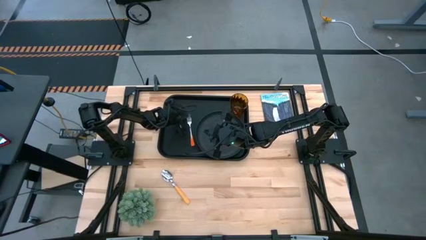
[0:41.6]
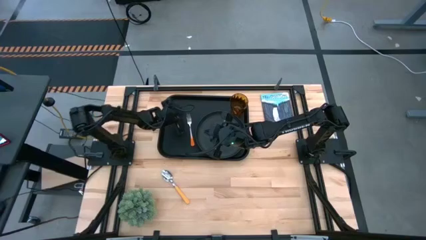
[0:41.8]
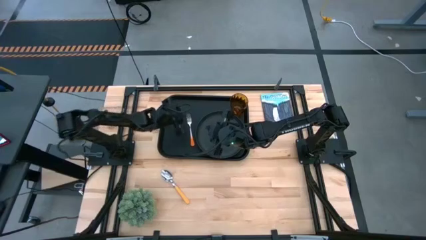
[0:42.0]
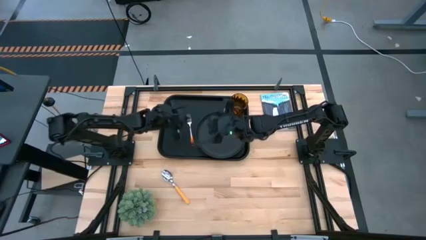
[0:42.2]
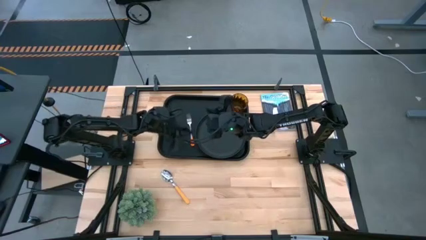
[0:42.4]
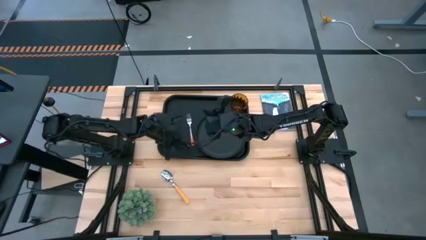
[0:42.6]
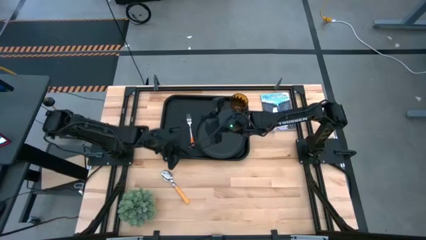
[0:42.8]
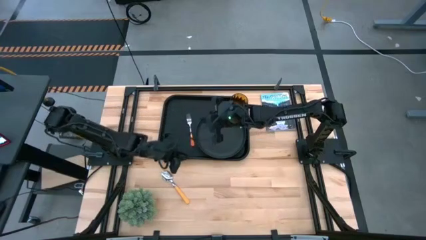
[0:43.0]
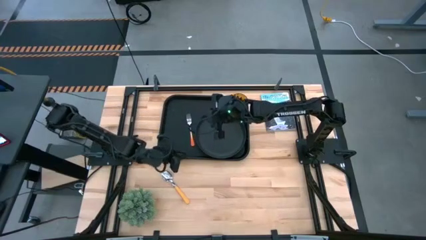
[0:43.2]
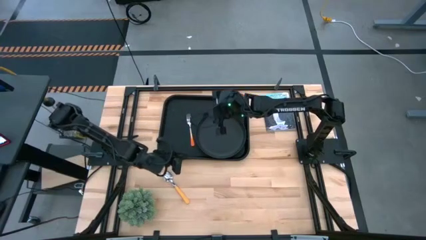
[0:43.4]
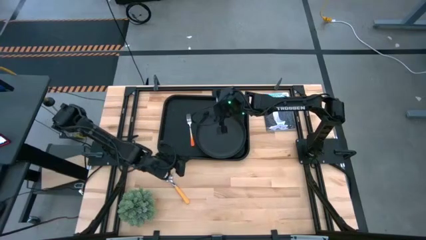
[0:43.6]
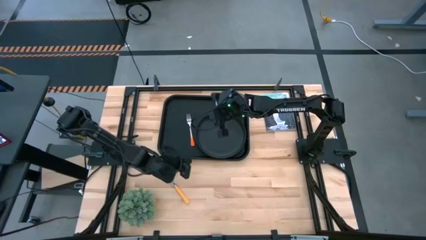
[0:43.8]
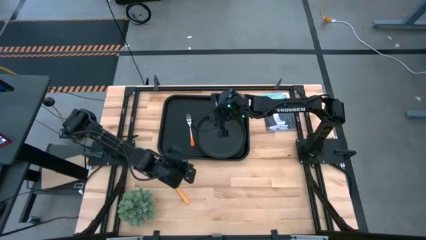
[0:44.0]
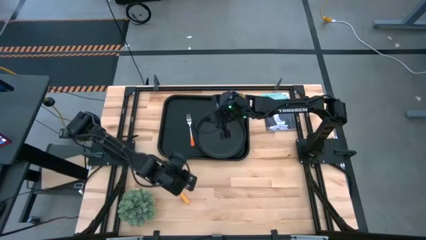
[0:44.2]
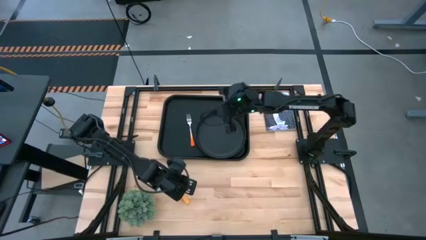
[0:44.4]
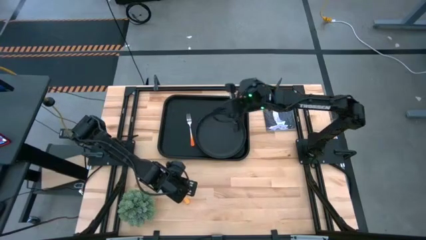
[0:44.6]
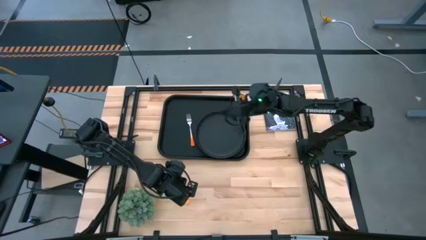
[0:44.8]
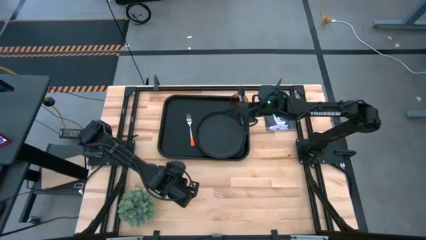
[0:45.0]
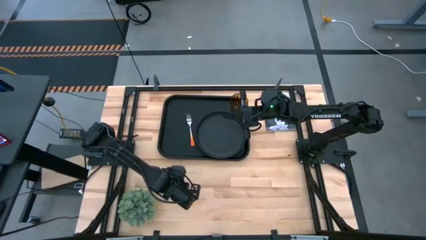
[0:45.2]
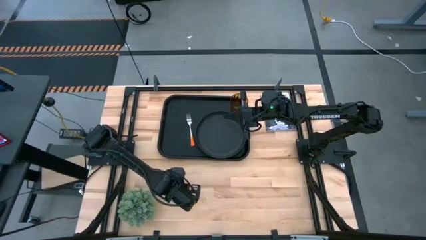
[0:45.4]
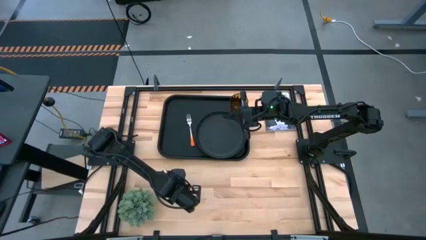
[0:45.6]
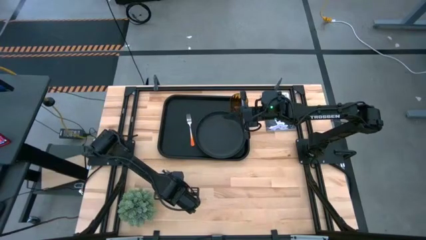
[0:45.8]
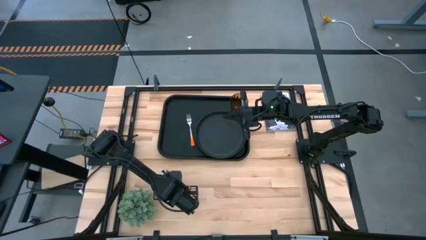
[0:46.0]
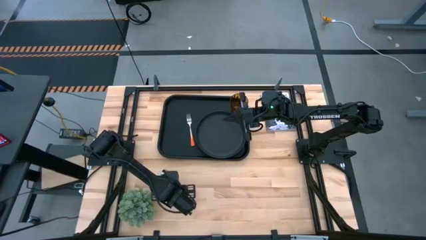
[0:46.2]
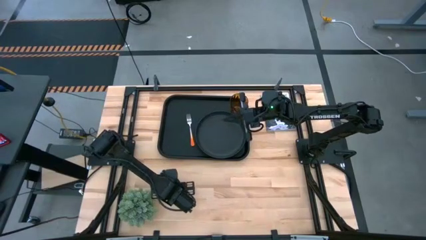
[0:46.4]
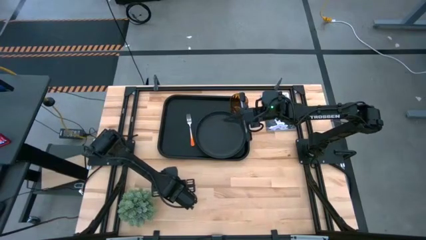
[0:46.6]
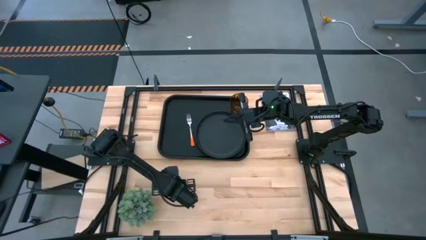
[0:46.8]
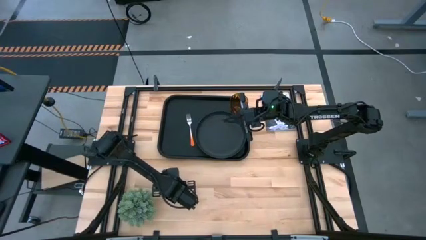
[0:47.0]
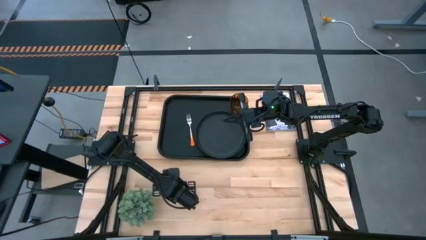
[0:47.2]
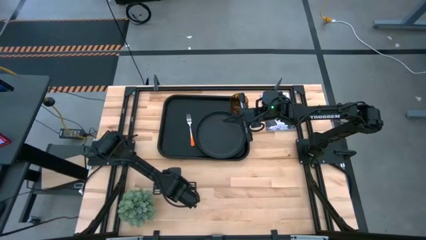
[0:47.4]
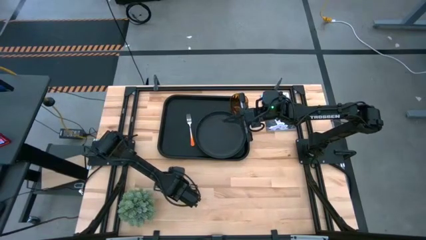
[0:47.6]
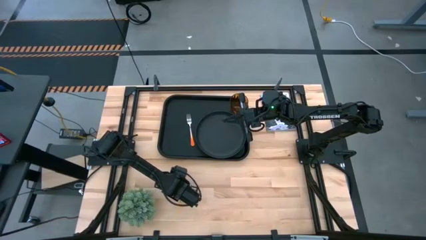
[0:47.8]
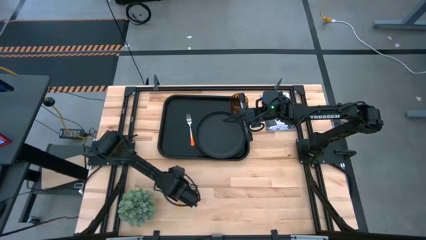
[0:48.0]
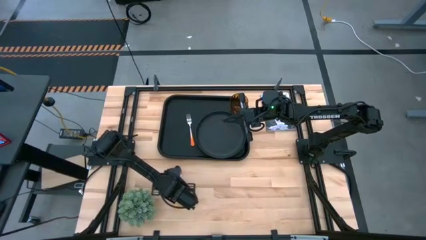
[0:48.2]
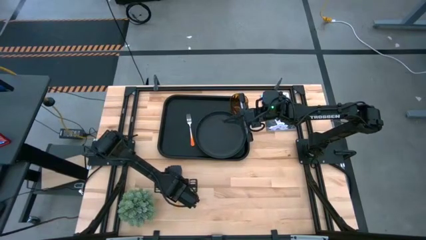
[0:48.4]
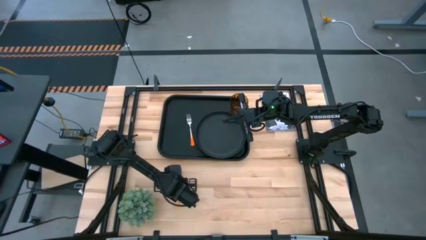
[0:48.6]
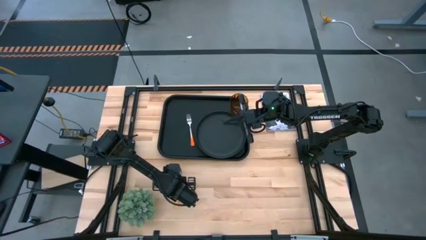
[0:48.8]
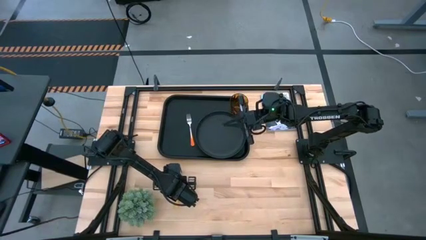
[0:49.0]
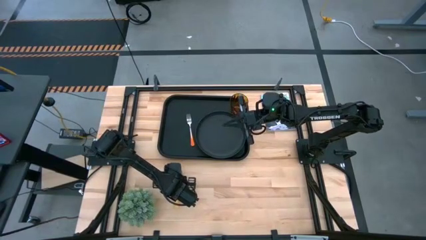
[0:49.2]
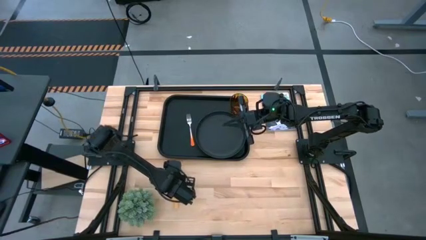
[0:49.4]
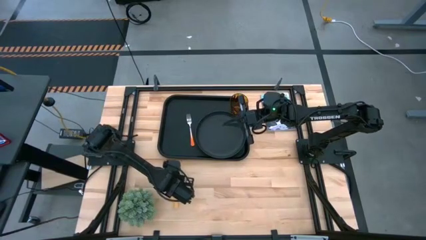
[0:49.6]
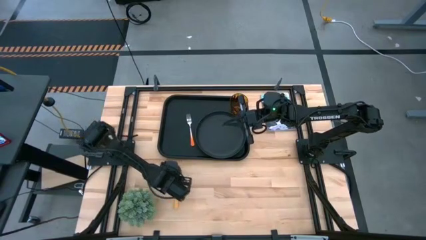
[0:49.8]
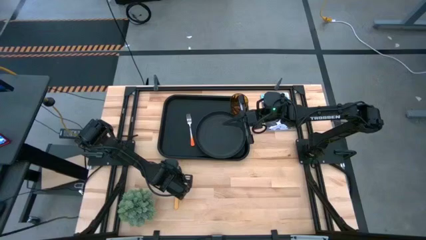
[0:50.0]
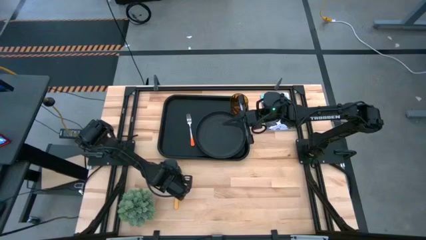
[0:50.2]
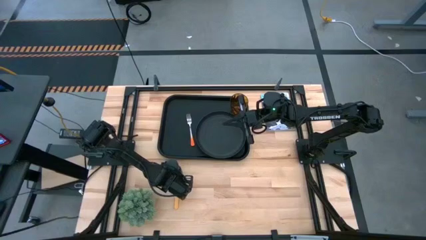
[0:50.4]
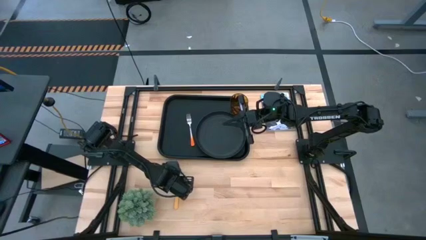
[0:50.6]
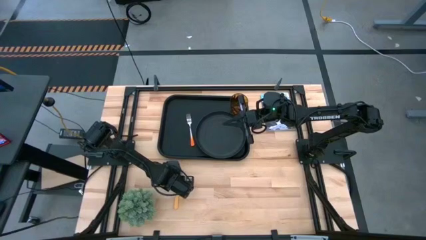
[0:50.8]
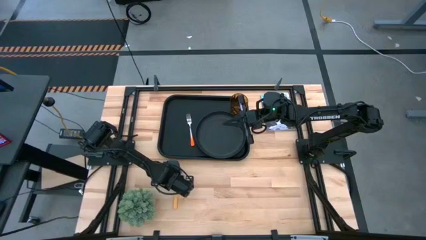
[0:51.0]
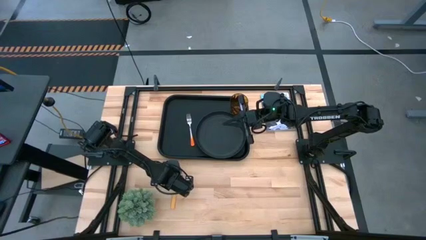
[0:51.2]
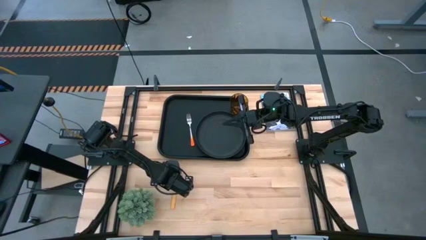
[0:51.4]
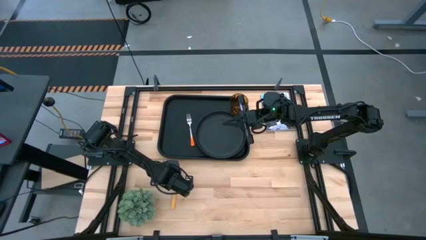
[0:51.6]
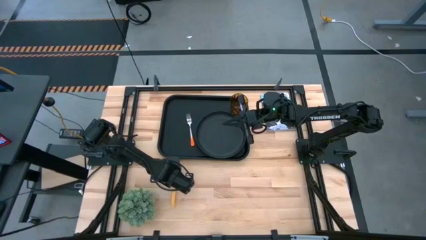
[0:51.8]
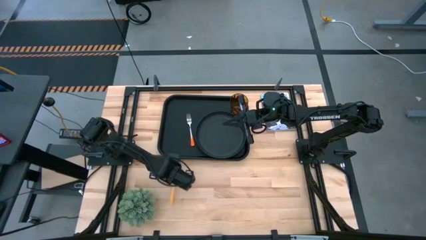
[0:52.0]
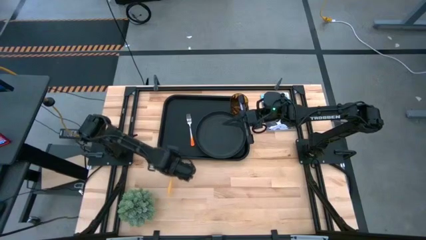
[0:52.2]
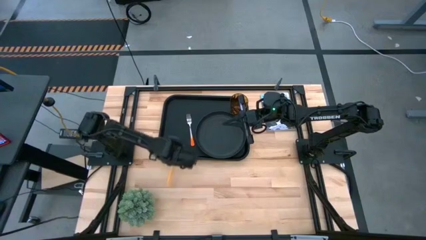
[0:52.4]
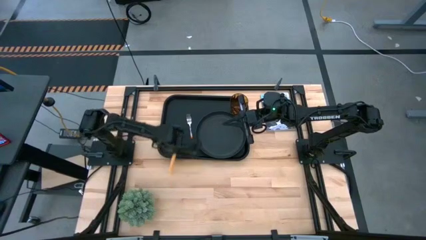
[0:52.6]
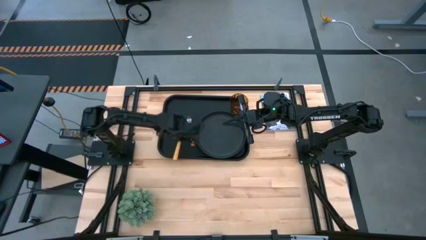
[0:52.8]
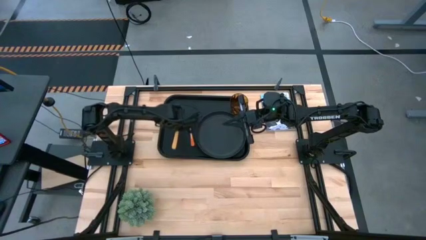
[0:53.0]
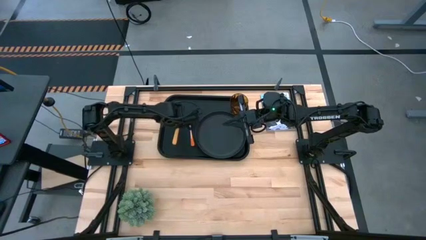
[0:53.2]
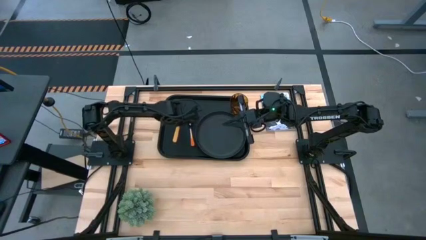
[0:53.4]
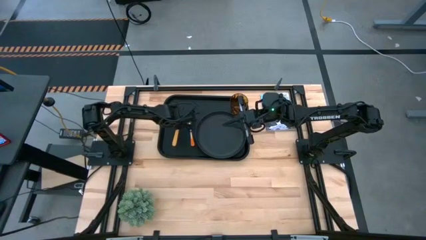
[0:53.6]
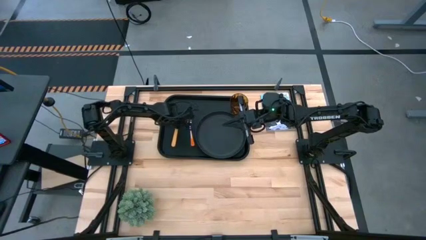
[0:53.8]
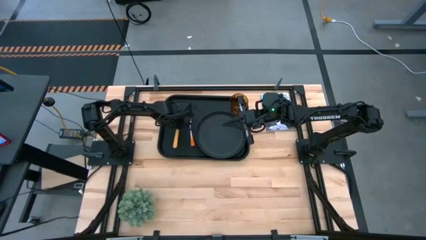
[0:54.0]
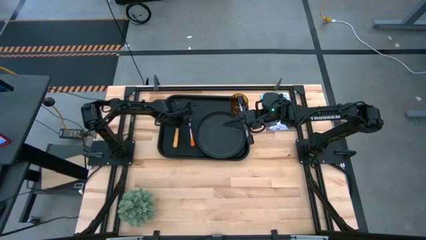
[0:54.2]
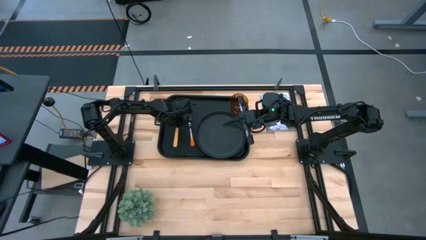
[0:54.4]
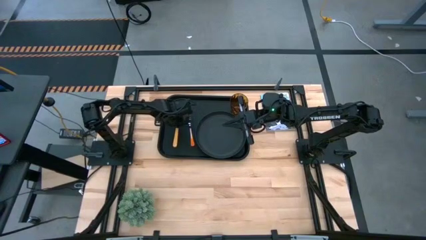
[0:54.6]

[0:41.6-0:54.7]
Task: Pick and place plate/cup/fork/spoon on tray
Put the light brown spoon on the black tray on the left side of the orange fork

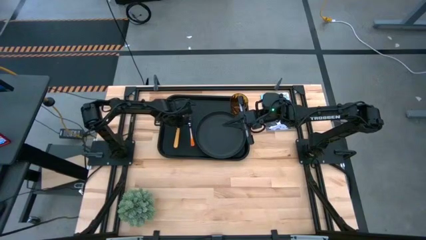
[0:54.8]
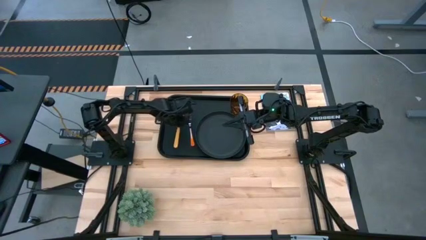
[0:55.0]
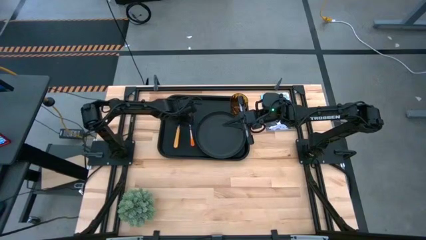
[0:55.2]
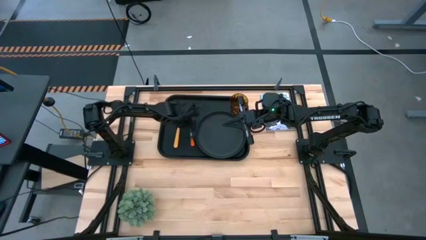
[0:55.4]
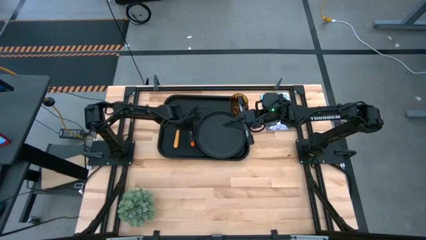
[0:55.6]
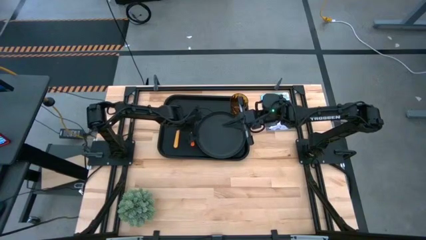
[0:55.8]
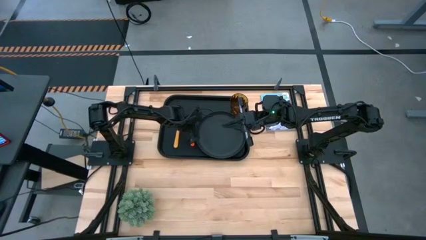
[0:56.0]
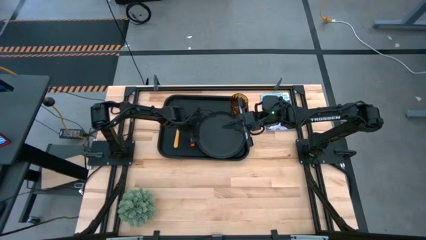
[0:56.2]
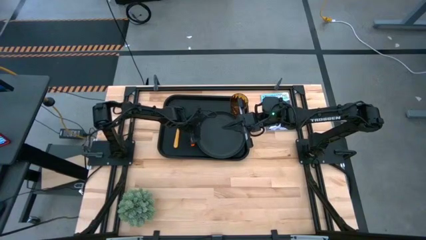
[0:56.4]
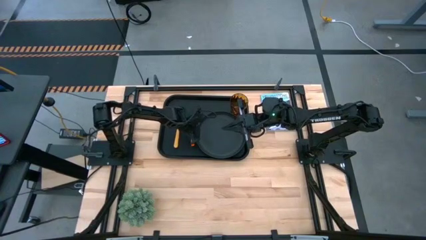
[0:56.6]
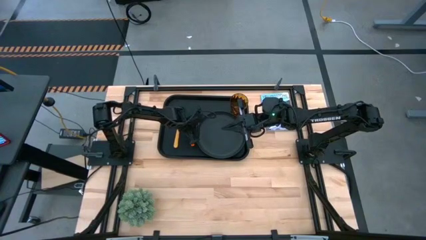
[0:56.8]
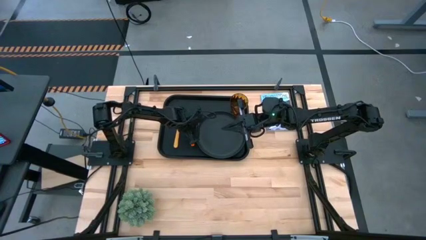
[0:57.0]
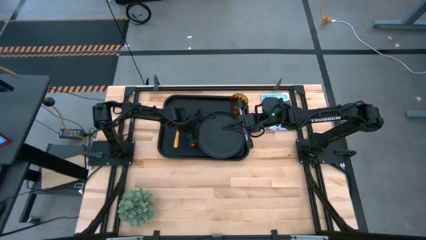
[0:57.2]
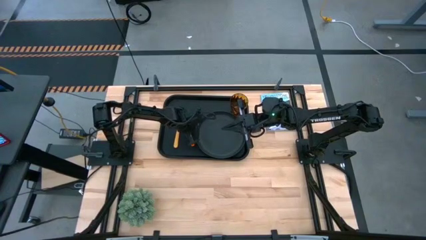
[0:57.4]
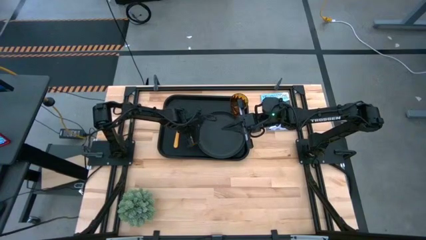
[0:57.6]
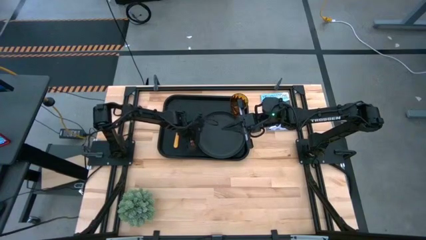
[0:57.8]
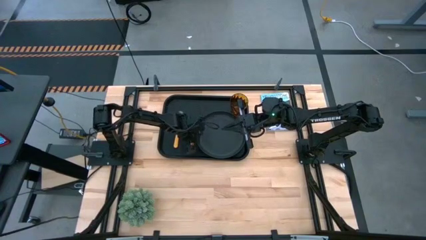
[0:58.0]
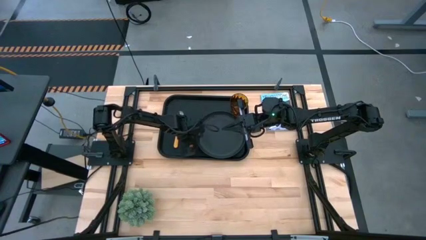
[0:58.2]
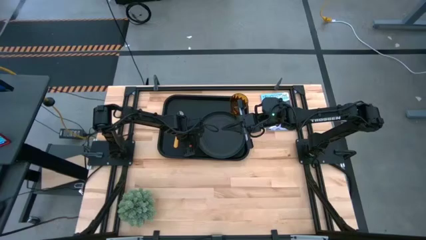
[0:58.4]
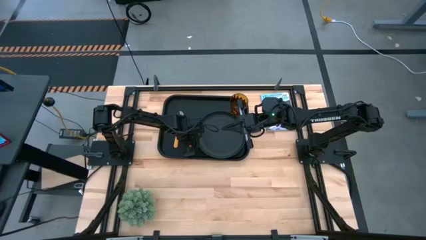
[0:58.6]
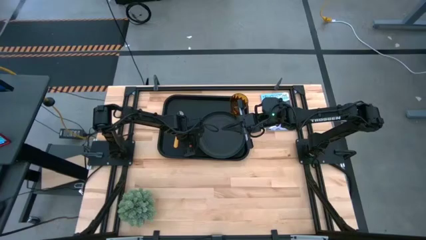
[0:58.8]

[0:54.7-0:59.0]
Adjust the orange fork
